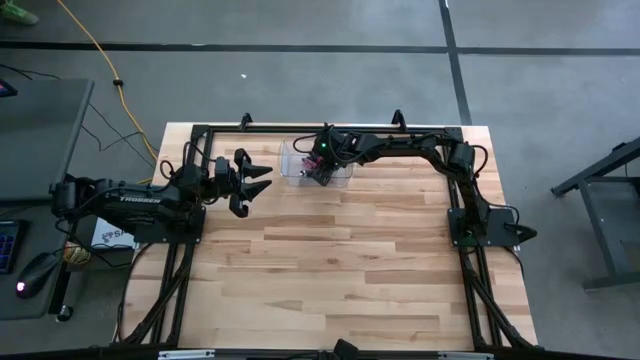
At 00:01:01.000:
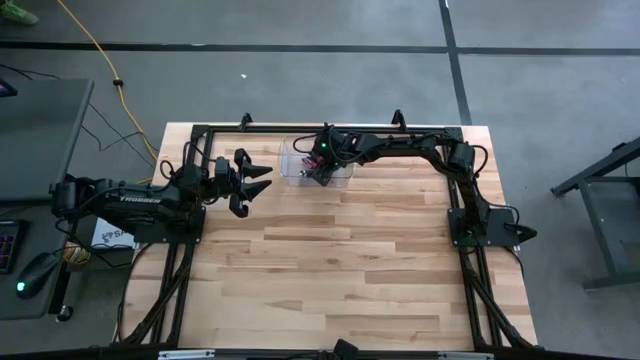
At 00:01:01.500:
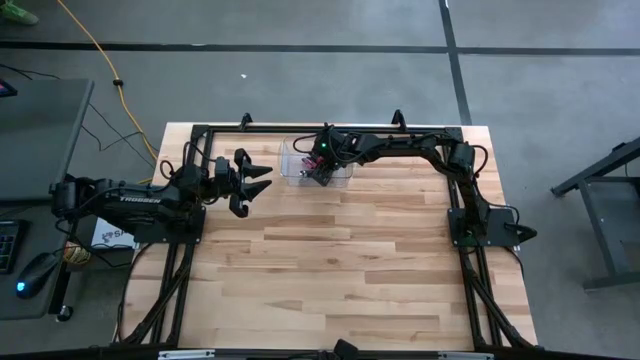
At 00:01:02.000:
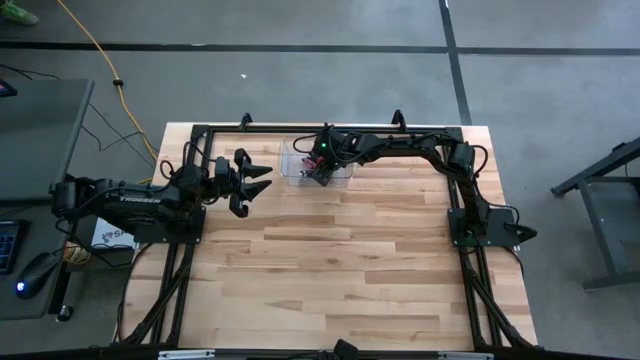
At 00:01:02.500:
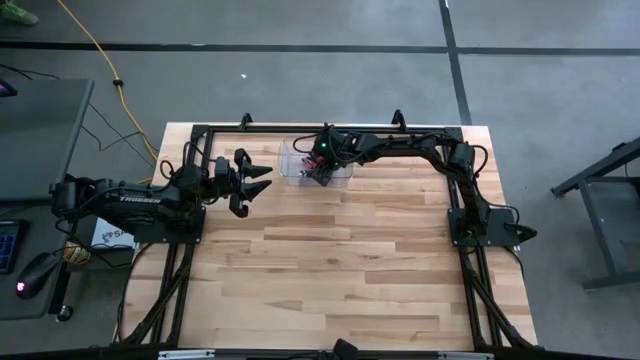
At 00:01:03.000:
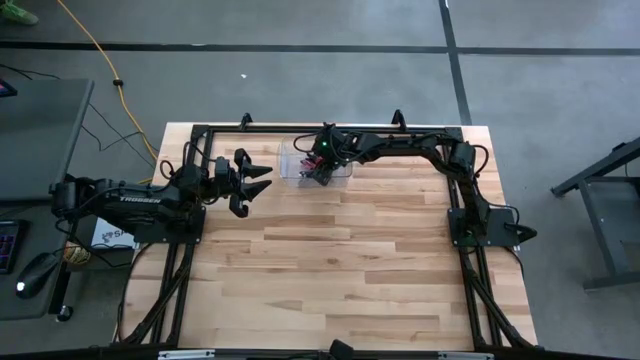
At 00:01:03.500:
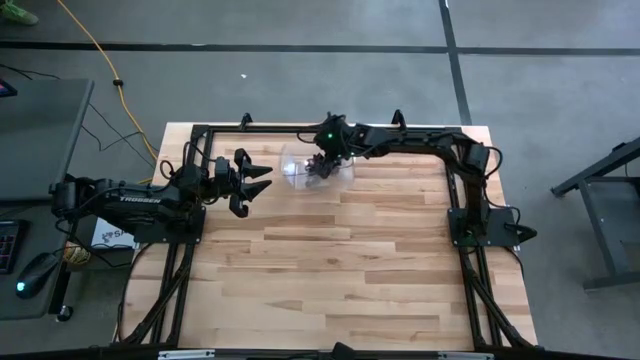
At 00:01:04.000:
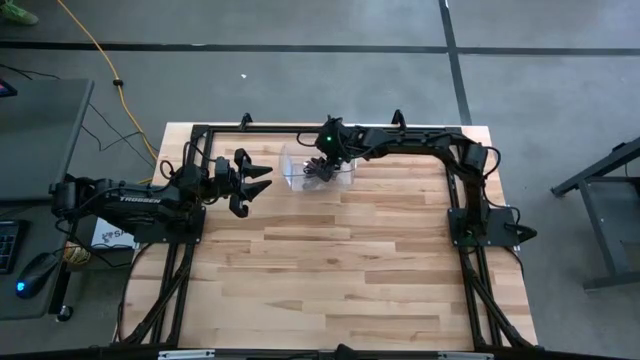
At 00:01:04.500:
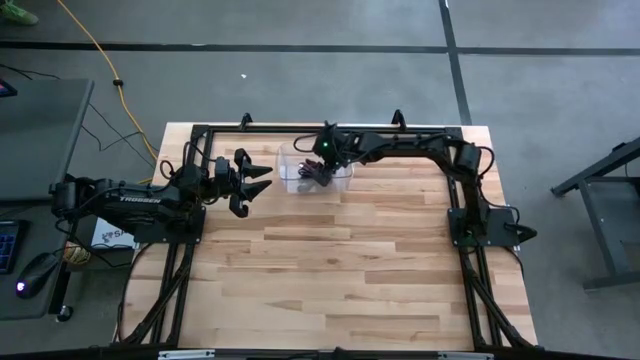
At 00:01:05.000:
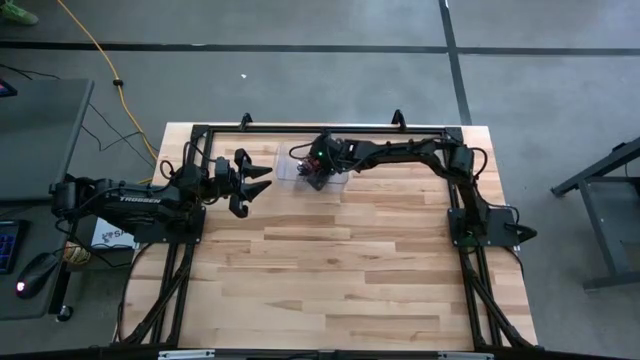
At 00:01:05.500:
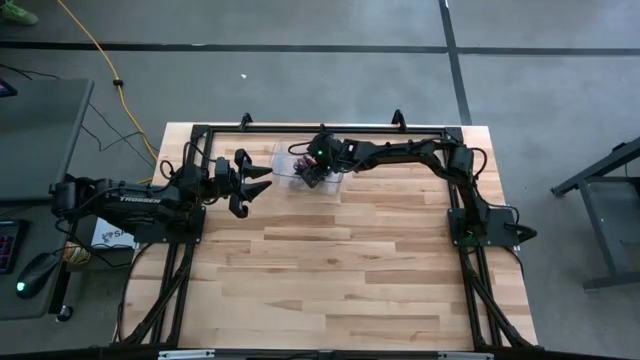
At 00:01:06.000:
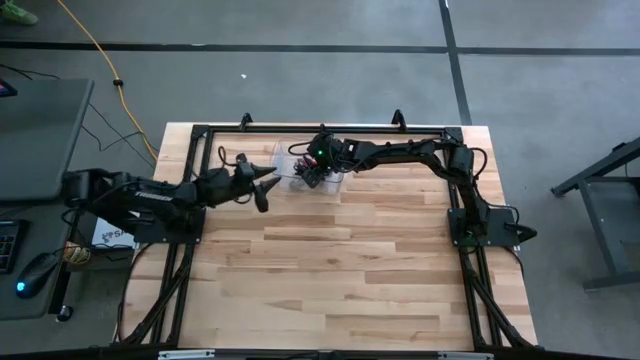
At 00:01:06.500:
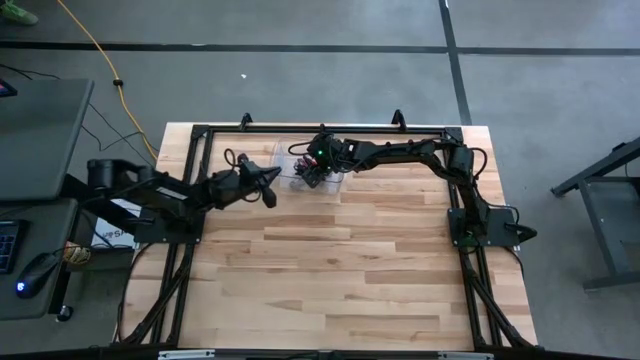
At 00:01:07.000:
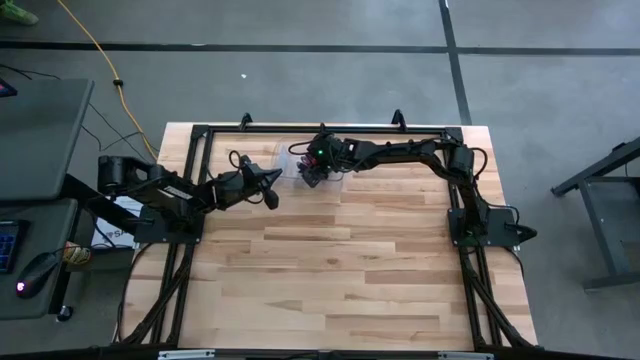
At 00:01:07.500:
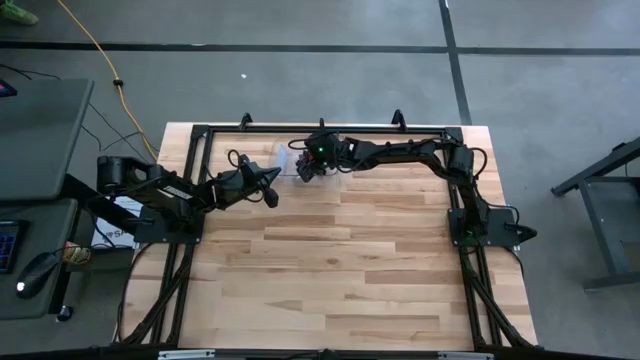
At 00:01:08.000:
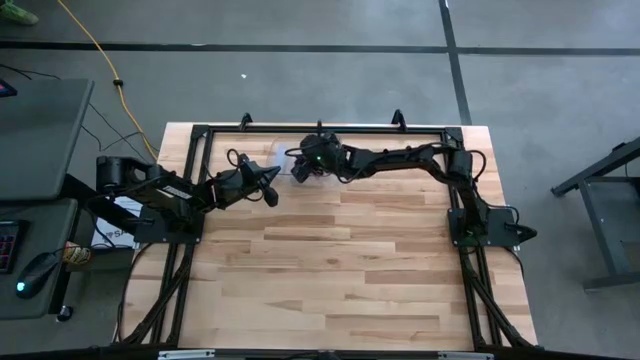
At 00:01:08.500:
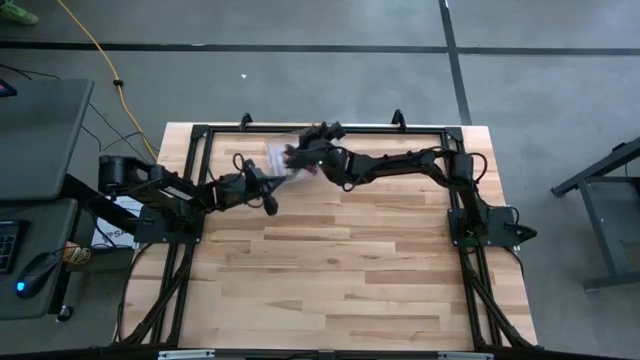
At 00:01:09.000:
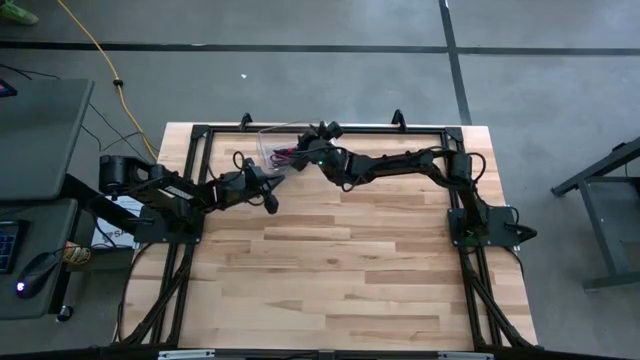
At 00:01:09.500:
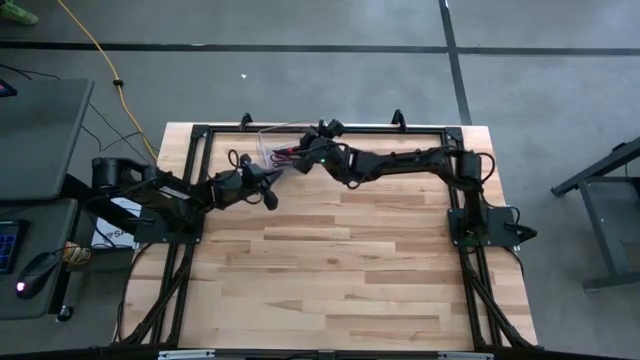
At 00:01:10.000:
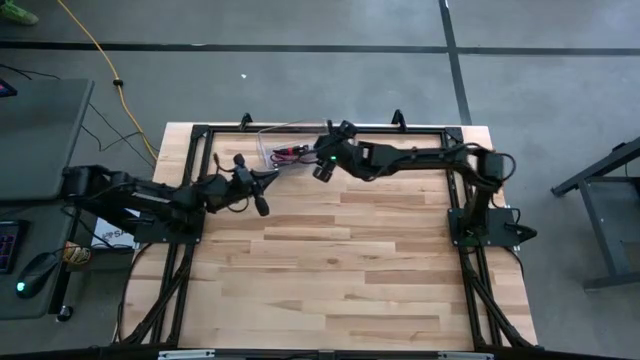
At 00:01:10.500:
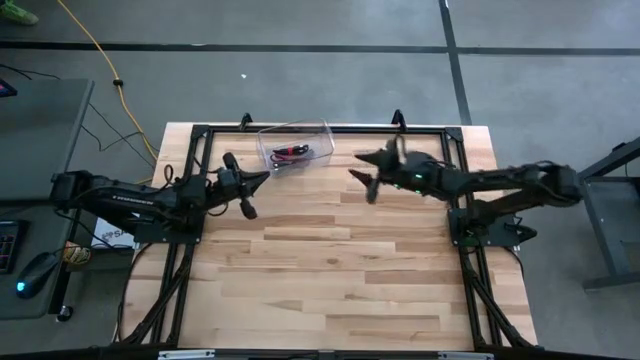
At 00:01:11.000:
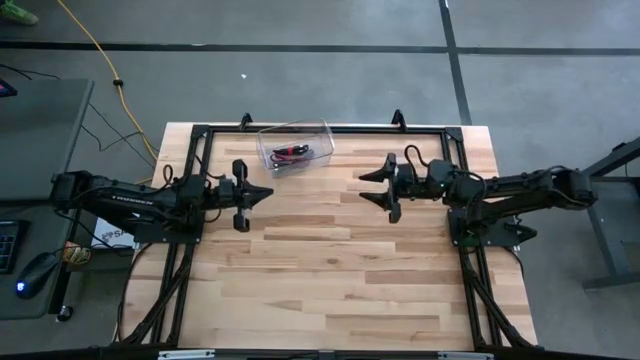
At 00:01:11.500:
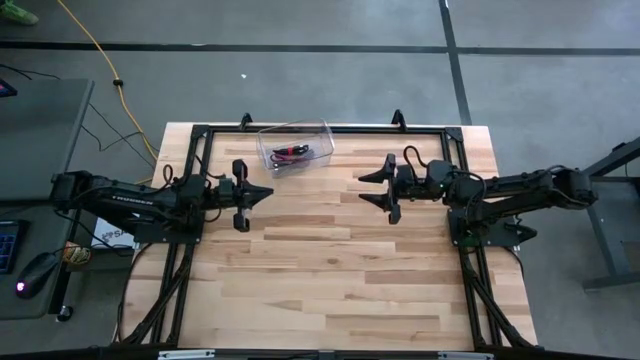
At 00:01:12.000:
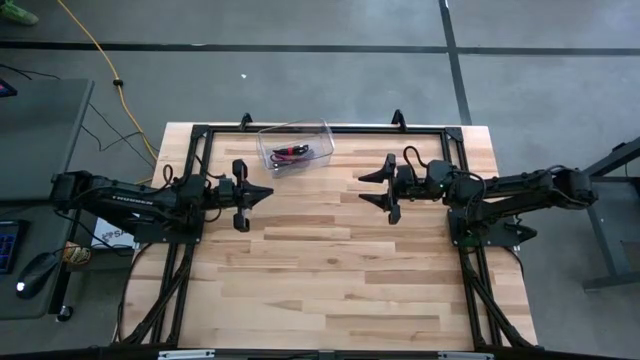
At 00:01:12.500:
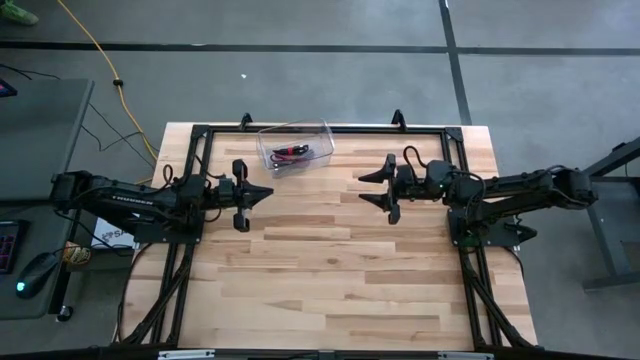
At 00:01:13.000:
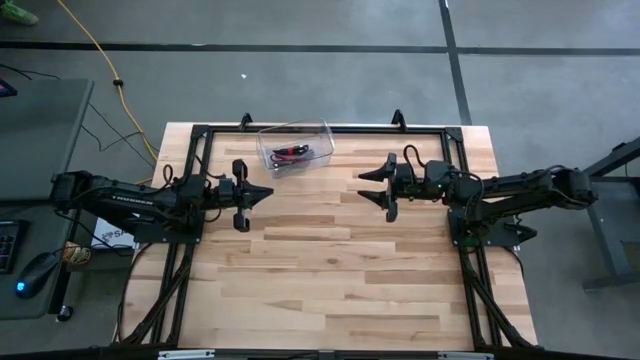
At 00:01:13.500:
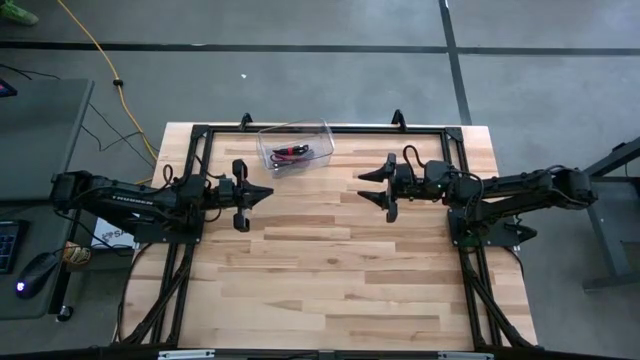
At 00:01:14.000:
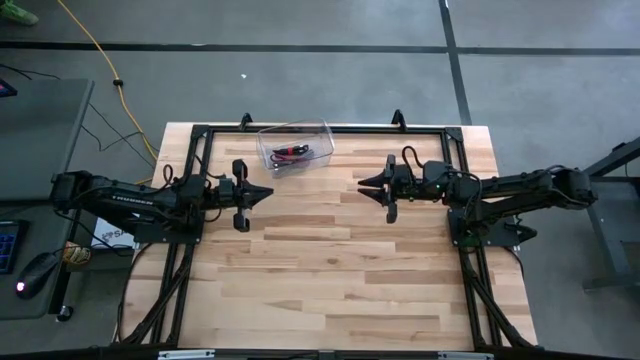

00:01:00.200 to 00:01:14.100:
Task: Pick and place USB-C Cables
Return to Home Position

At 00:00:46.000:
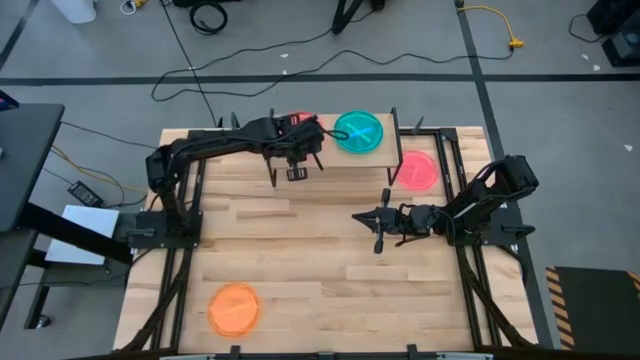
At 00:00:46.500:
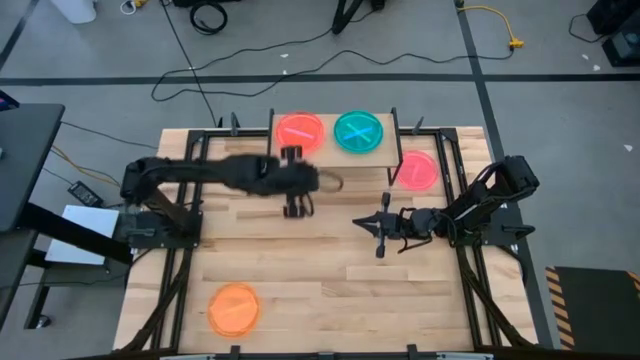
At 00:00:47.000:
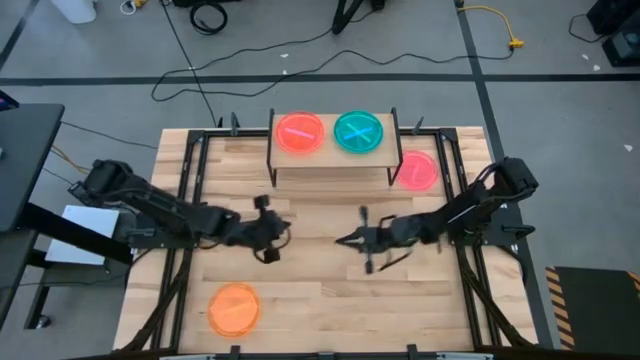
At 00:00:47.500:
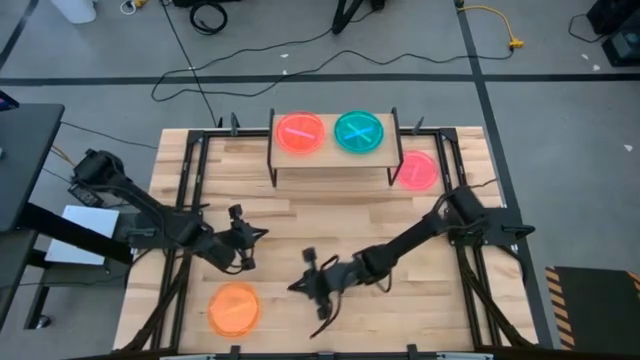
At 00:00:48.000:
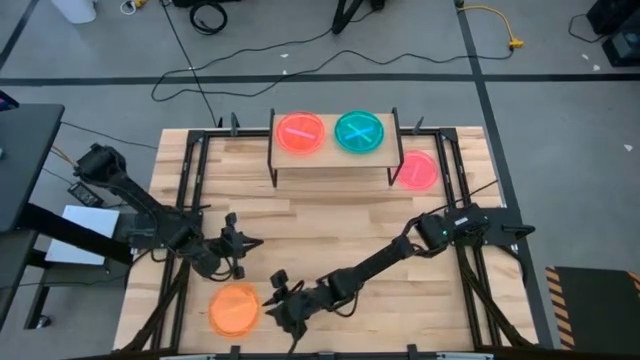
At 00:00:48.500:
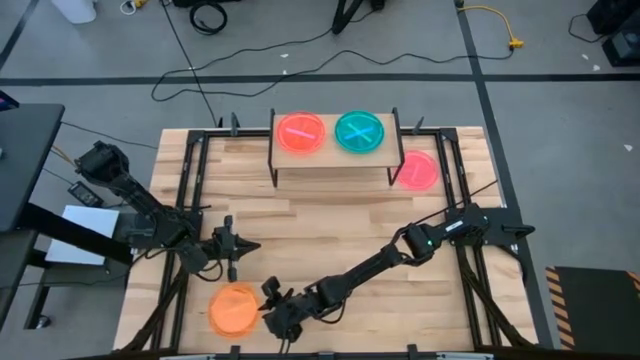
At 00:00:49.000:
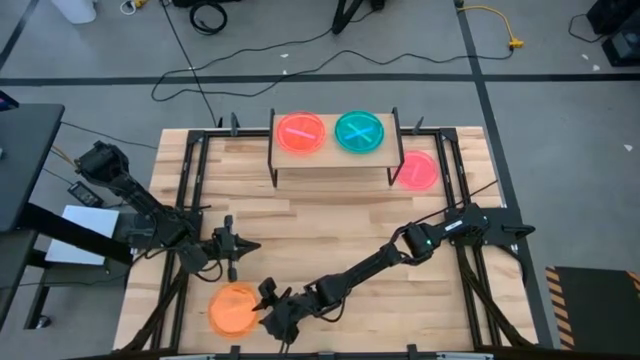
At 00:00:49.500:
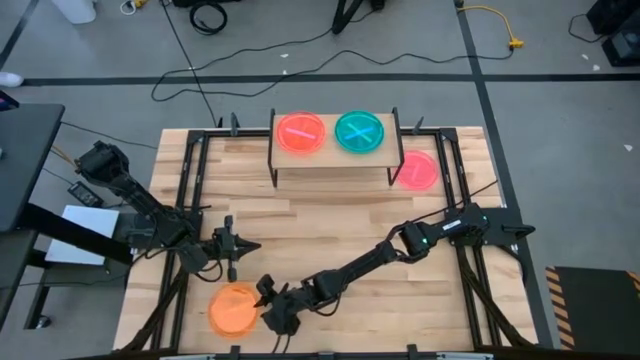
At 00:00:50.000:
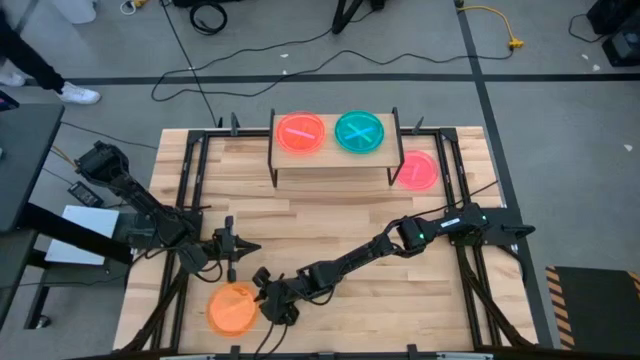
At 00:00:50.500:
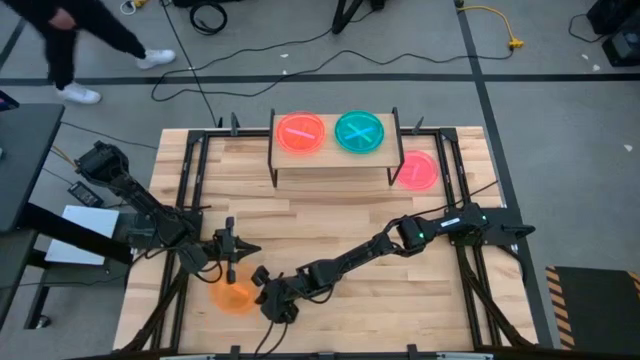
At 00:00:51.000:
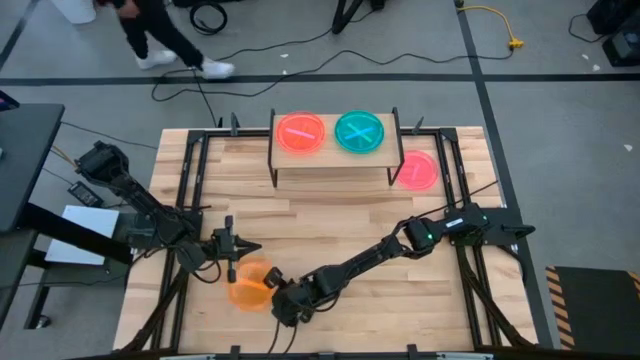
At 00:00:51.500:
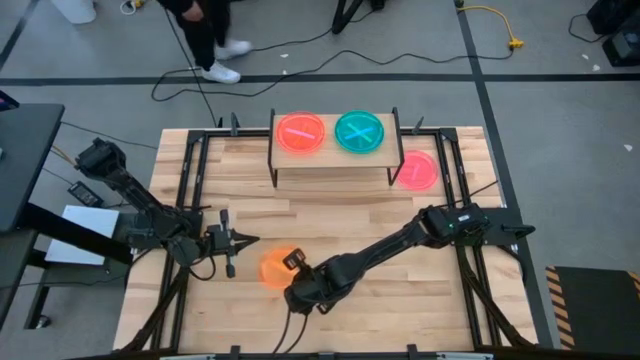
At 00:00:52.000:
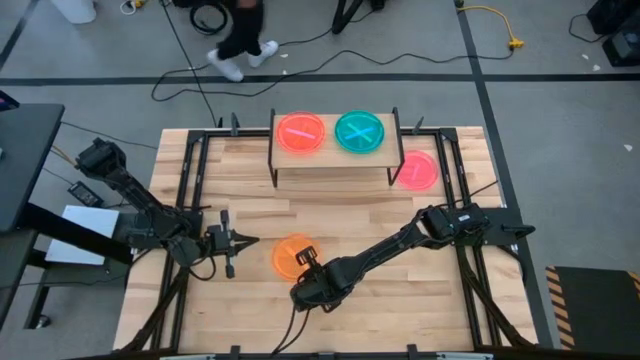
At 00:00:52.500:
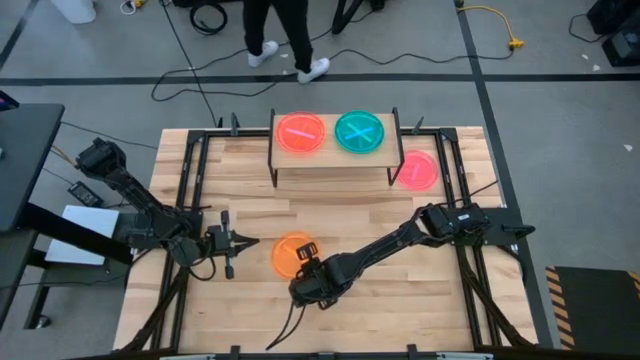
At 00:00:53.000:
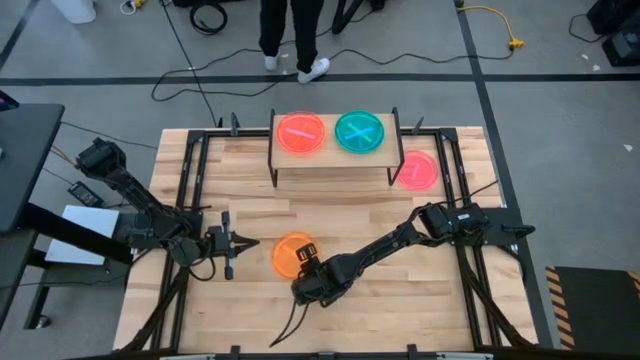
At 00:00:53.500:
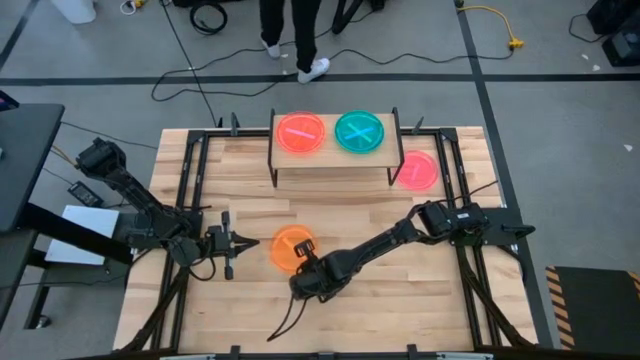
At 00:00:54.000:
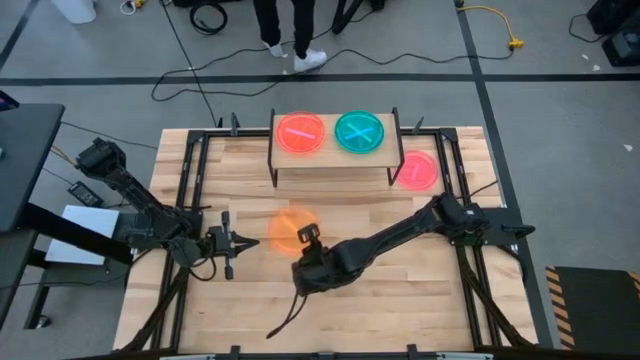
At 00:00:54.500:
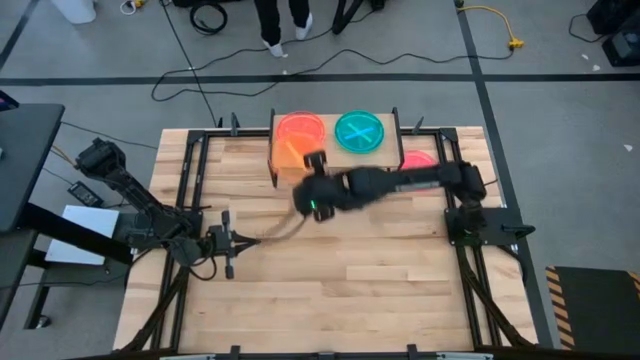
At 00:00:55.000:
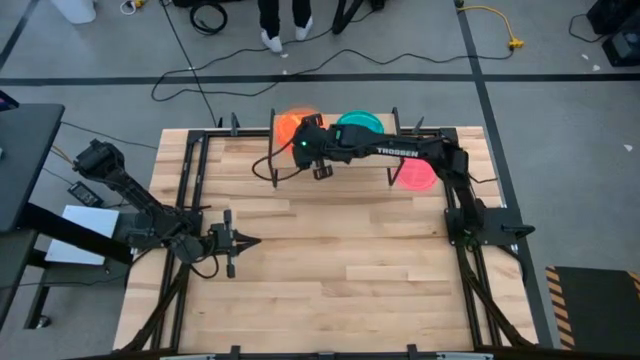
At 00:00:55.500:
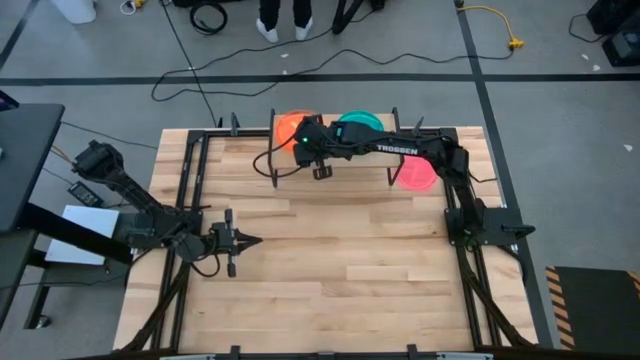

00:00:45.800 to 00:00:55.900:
Task: Place and stack plates onto a shelf
Stack the orange plate on top of the red plate on the shelf
